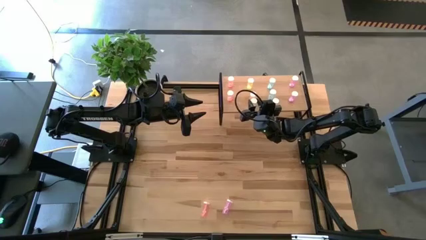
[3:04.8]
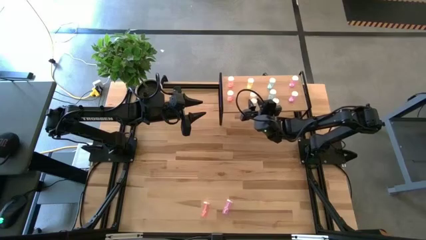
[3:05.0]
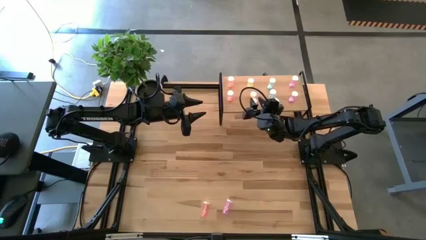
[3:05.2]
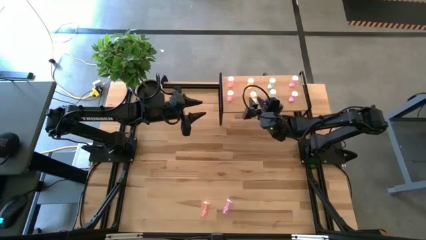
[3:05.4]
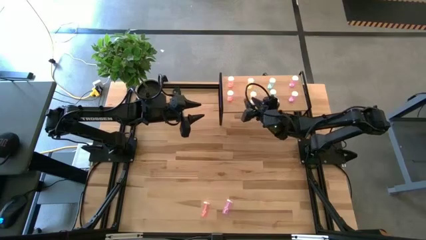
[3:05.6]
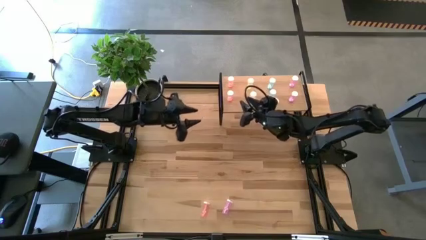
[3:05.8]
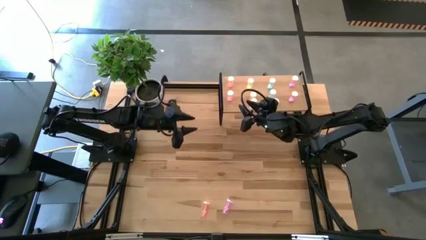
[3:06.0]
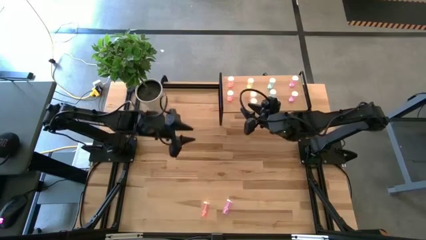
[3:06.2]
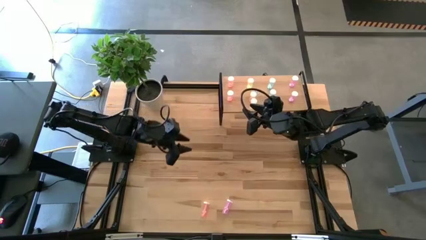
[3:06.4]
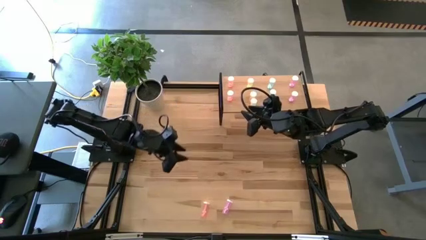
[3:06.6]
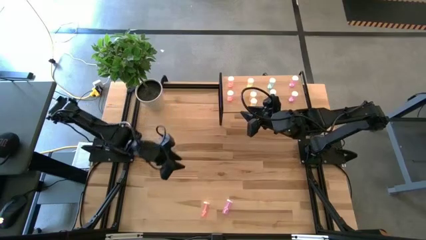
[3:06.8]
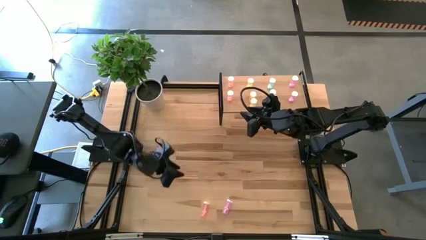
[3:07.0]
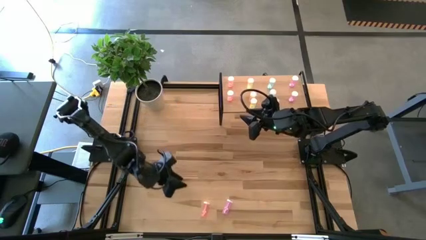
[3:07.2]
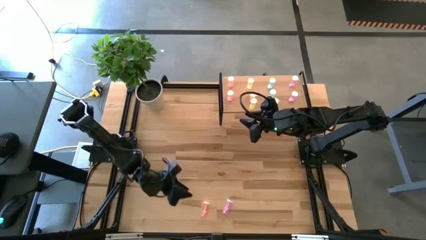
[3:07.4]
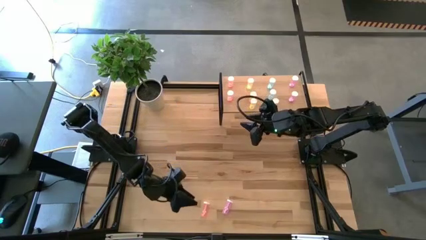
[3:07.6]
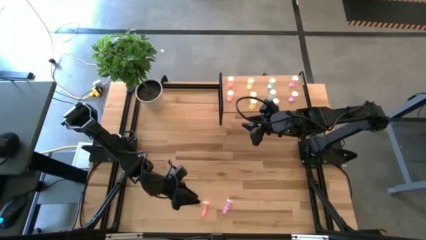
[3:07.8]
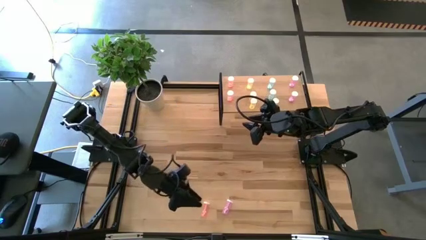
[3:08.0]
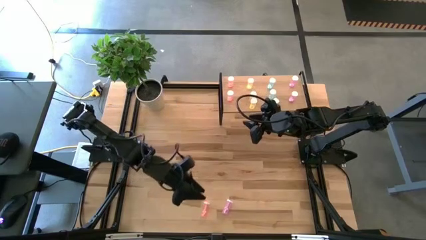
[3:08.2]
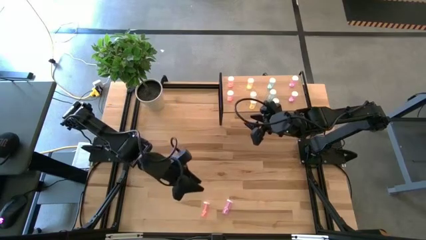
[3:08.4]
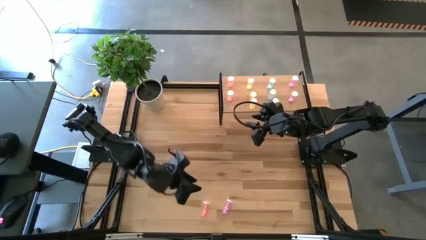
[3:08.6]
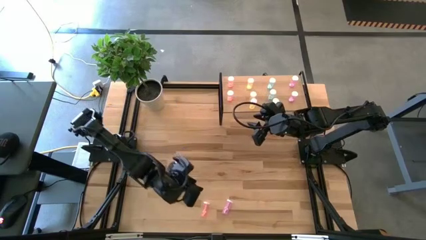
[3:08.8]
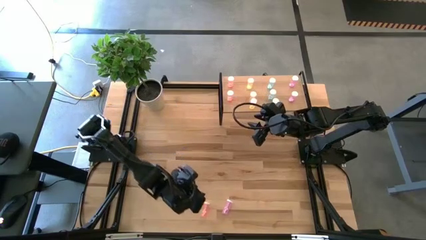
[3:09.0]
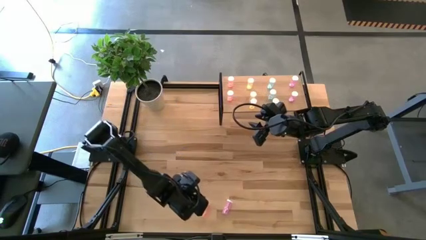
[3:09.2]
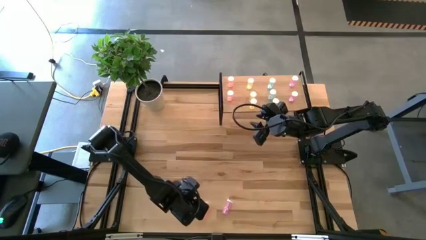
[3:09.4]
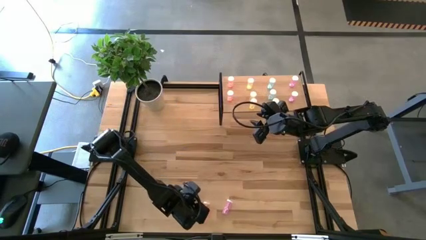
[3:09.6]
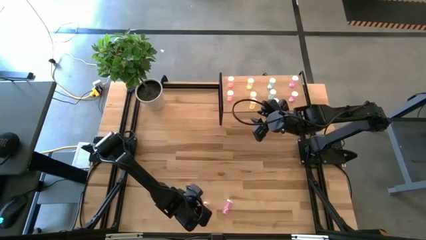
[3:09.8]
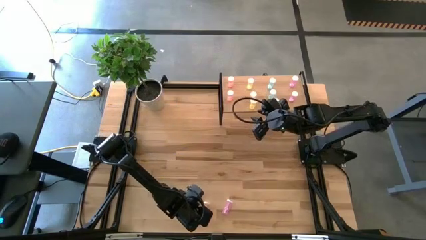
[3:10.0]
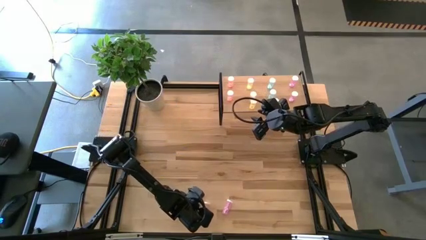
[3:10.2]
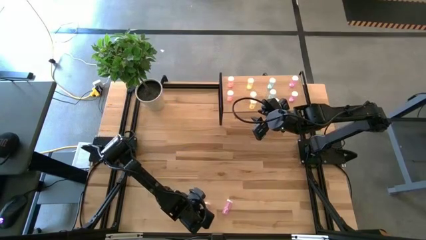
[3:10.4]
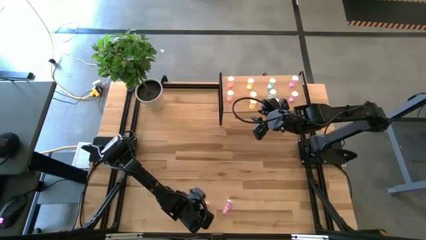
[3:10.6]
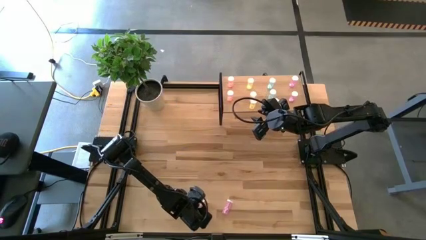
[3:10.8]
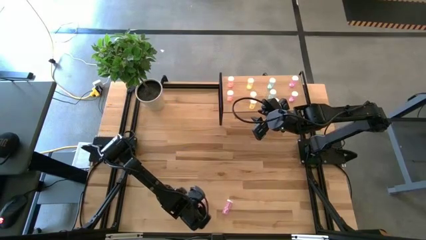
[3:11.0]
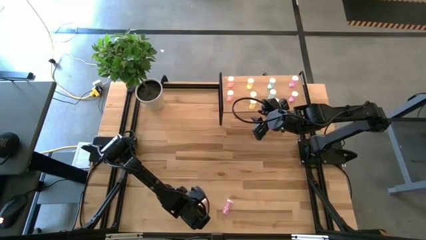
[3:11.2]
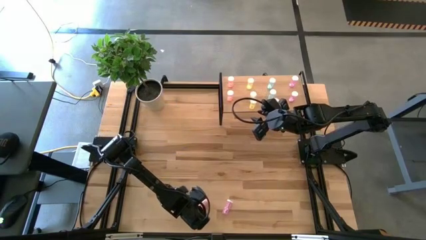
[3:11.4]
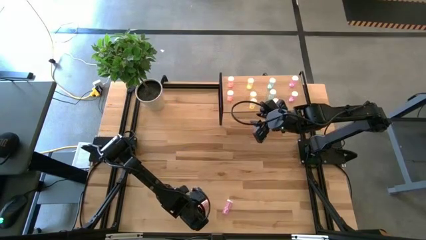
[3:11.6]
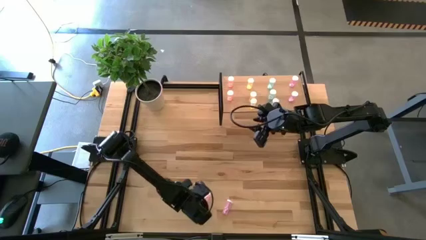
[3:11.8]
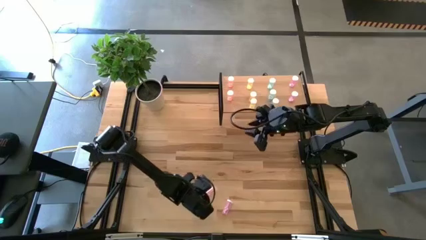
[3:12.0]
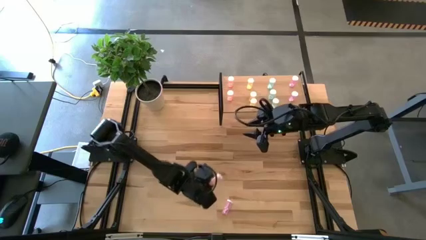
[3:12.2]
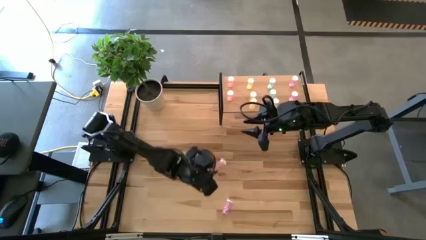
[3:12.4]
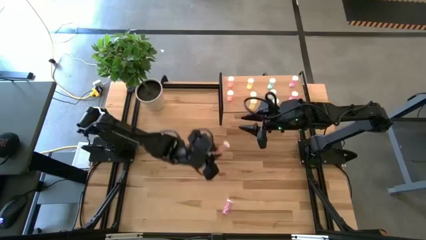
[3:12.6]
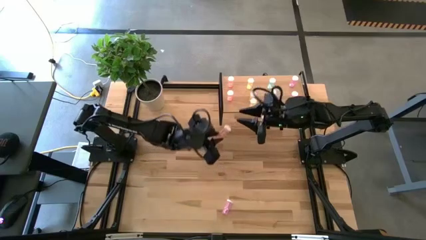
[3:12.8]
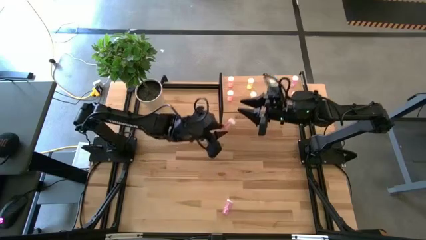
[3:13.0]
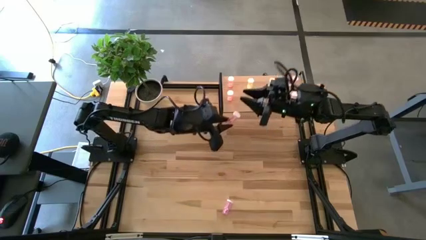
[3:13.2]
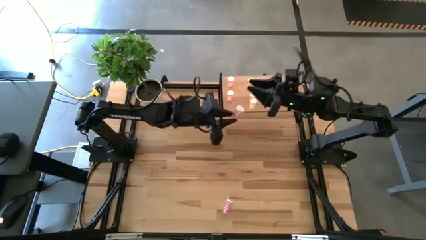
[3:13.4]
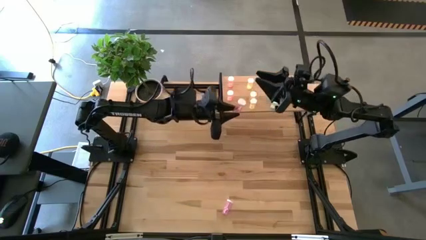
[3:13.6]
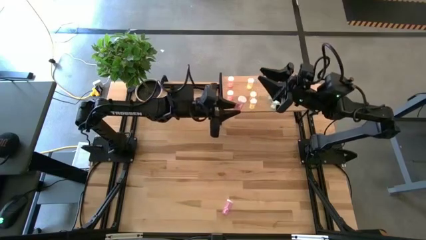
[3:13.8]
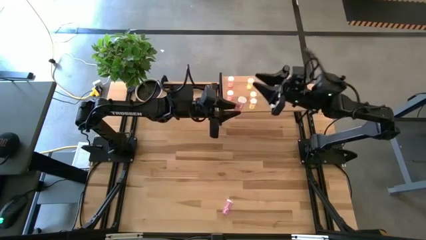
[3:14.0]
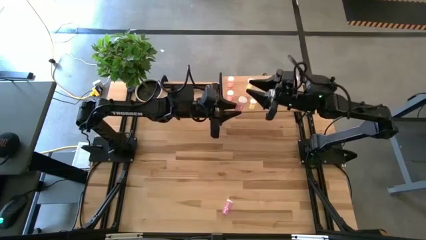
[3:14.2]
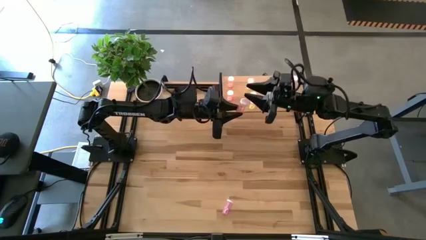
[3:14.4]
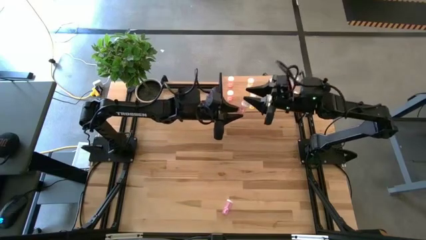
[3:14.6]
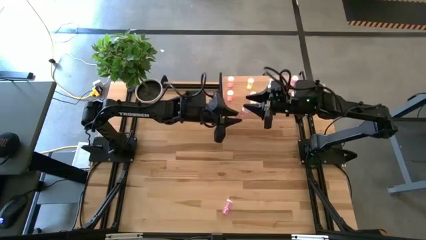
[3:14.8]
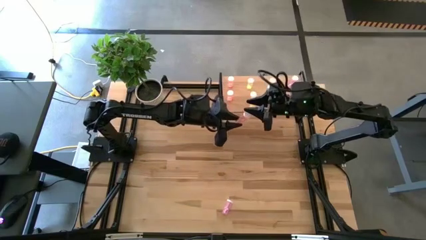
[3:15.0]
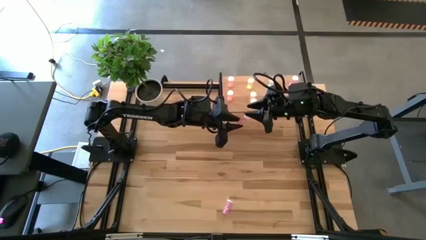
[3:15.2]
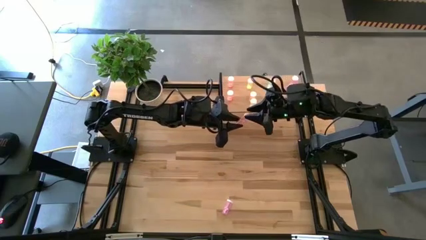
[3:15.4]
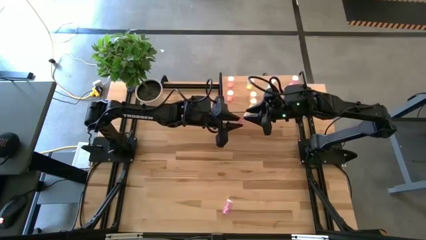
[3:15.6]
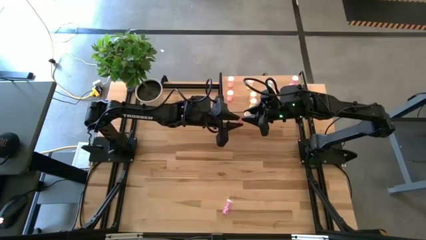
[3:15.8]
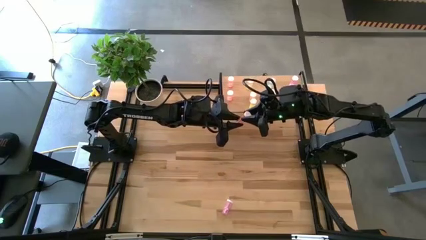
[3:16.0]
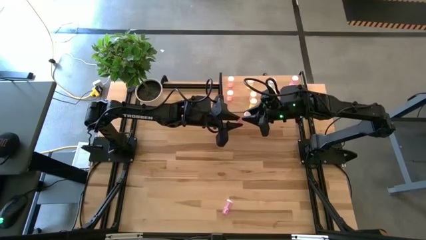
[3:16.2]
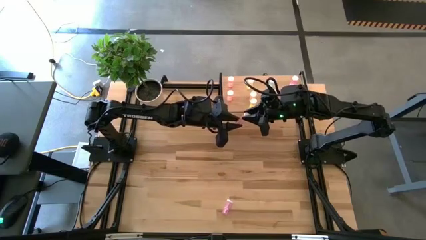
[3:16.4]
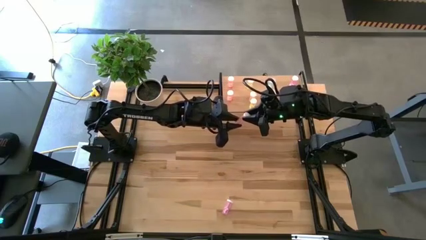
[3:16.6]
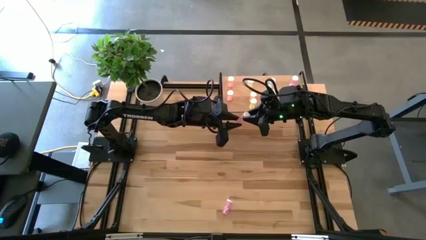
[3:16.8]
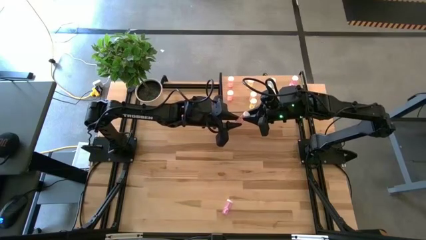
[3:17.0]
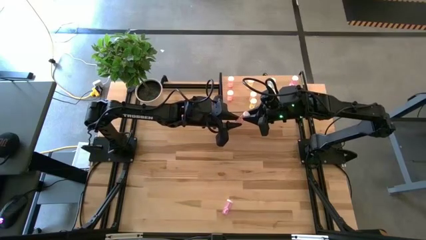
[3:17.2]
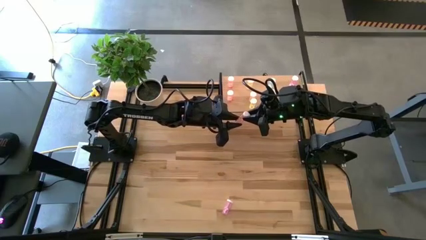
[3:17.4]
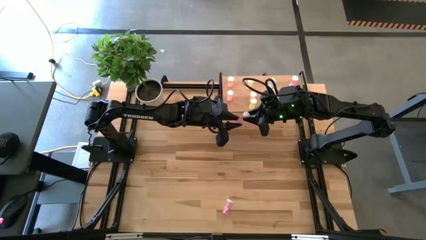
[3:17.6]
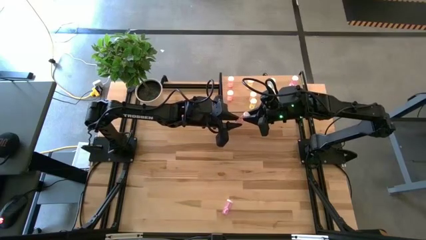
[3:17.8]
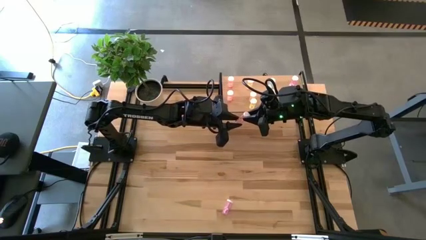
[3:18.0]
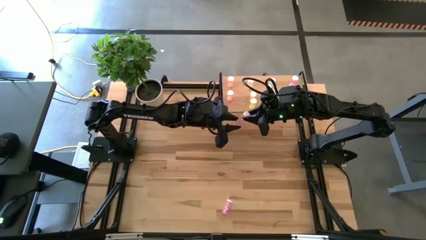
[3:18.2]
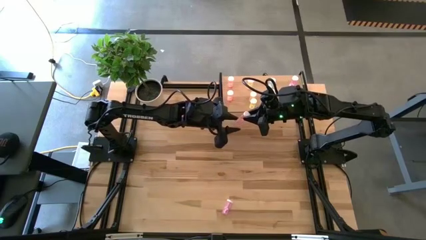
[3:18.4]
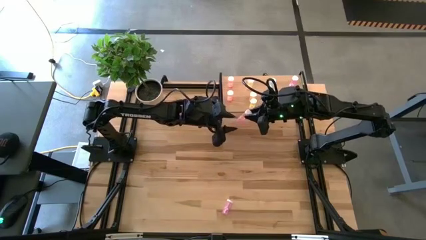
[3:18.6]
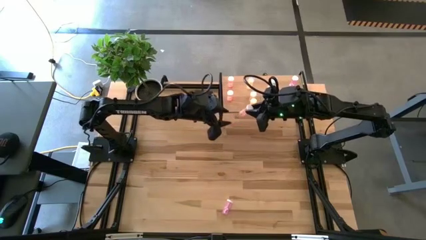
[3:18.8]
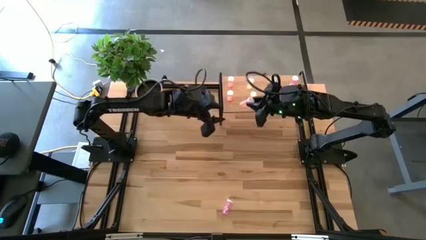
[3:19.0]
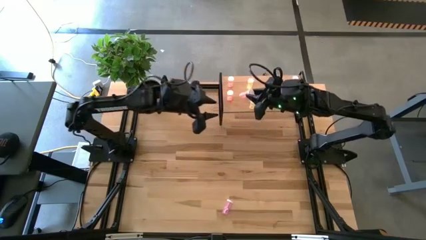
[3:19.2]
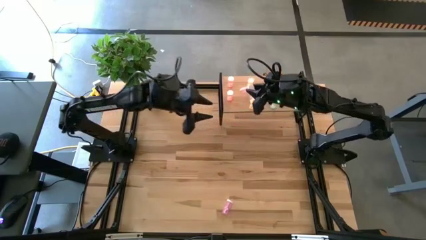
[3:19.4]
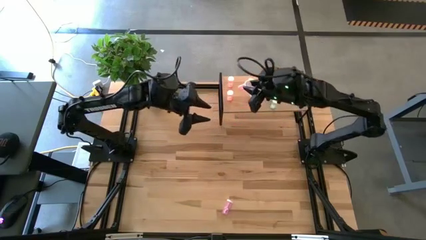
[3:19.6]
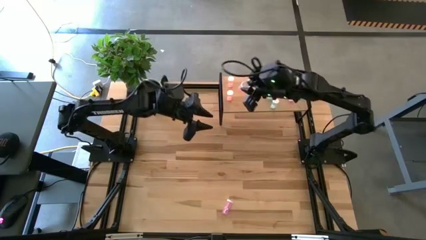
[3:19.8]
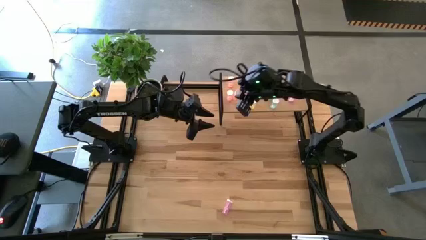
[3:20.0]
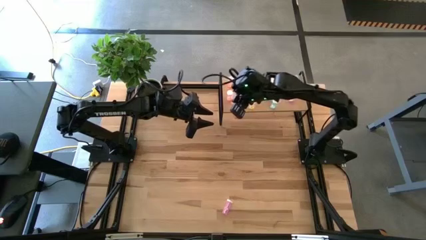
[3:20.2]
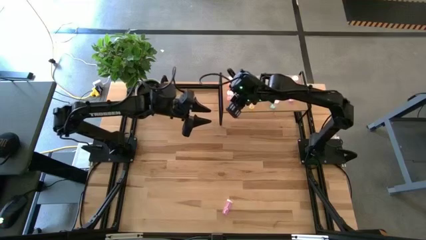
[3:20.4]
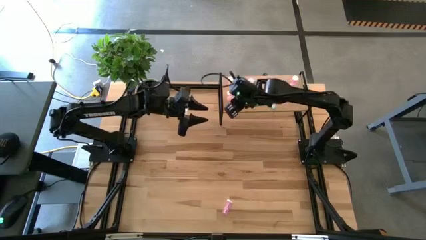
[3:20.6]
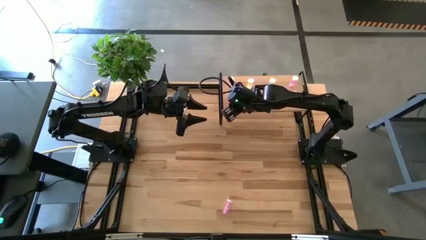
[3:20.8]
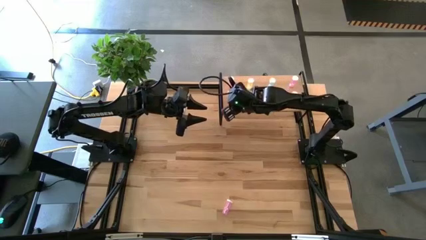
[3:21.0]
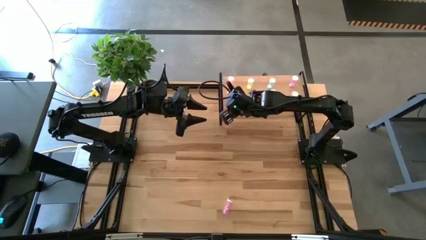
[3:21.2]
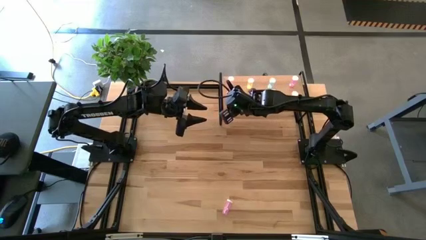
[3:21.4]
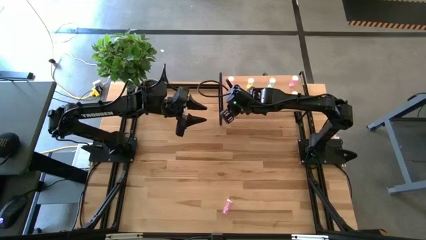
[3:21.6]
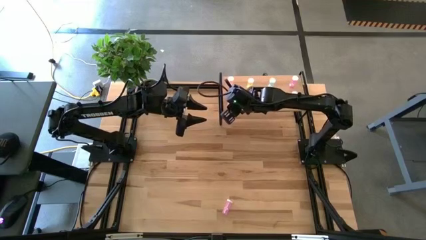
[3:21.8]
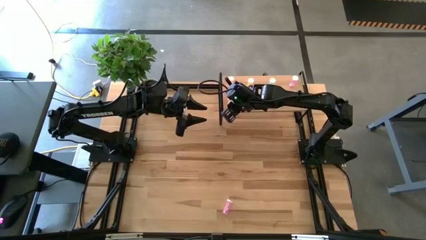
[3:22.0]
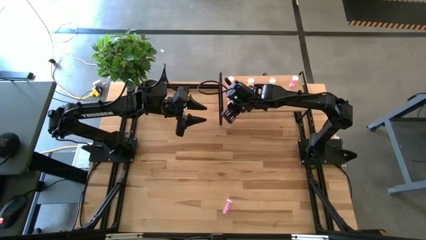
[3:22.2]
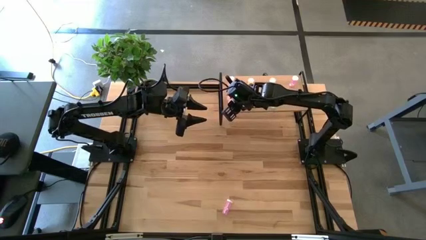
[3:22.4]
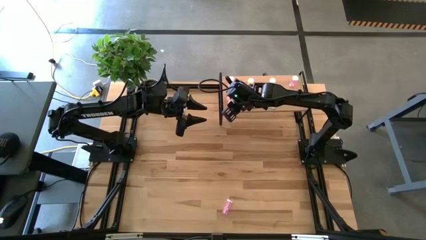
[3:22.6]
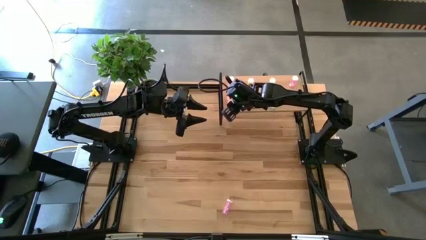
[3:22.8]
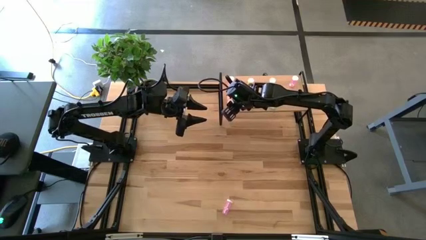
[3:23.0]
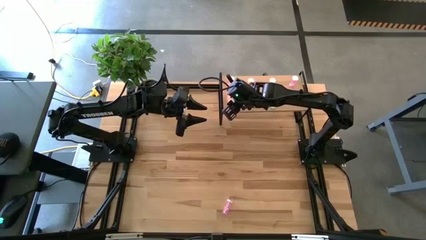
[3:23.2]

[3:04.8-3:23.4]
Task: Pick and place medicine bottles onto shelf by color
Put the pink pill bottle on the shelf aligned with the other pink pill bottles
